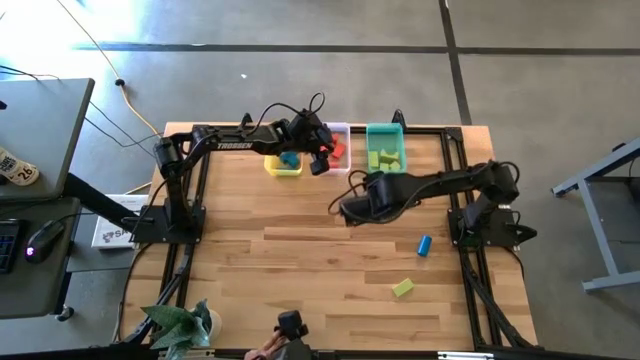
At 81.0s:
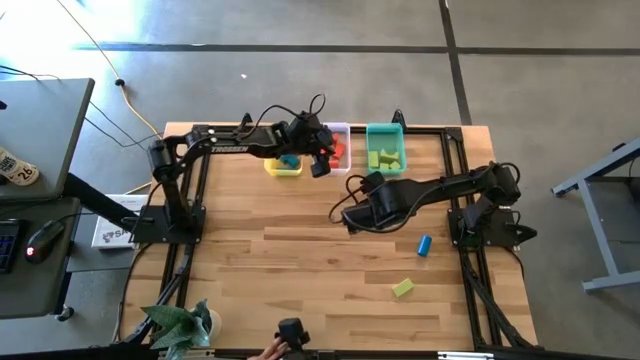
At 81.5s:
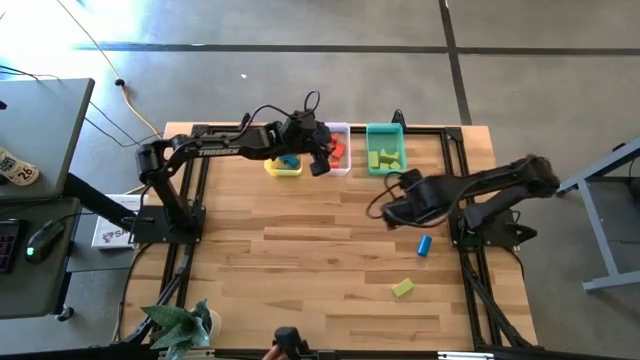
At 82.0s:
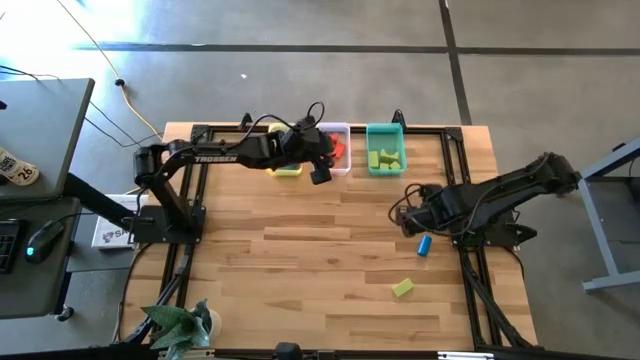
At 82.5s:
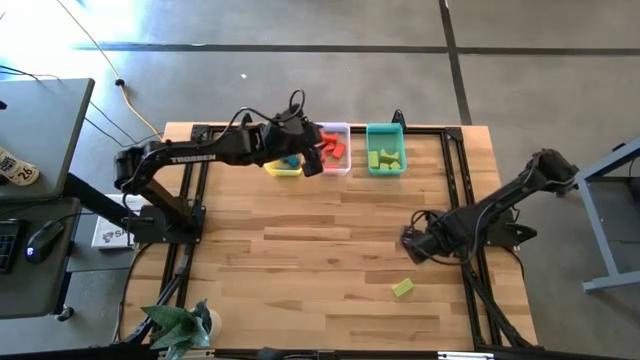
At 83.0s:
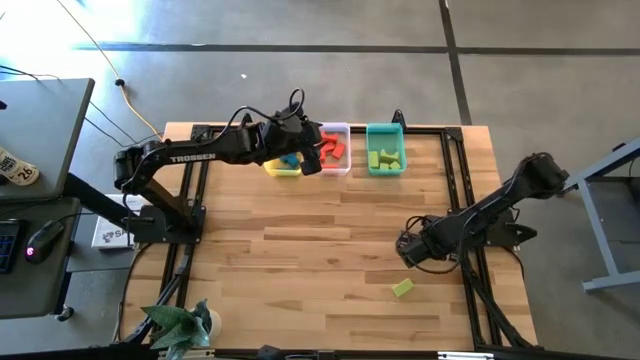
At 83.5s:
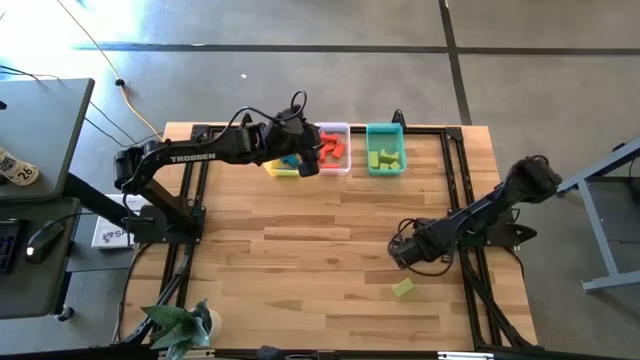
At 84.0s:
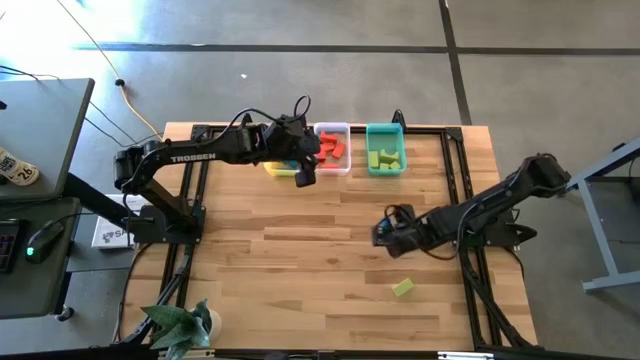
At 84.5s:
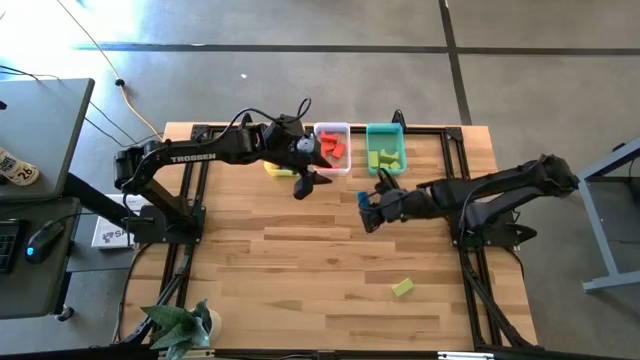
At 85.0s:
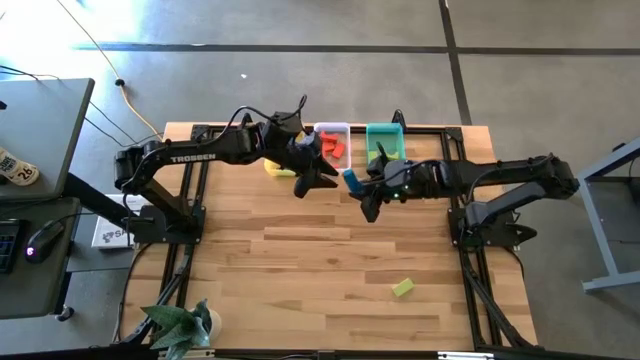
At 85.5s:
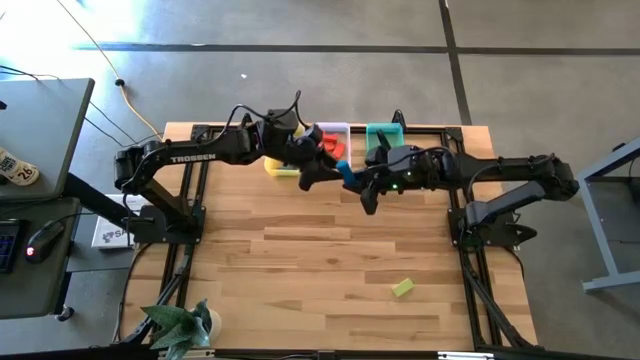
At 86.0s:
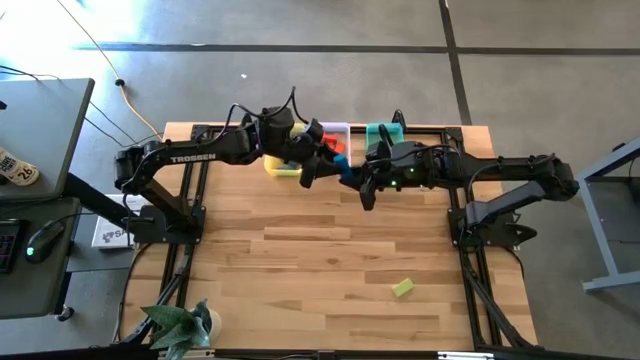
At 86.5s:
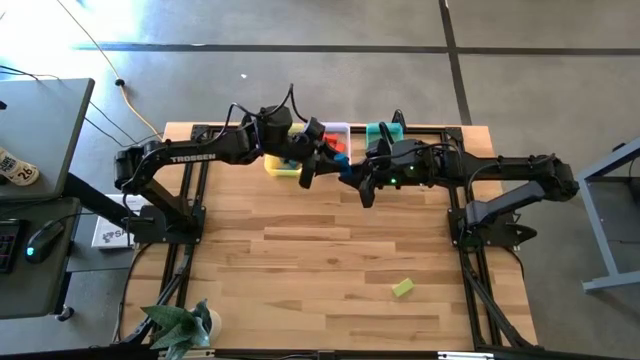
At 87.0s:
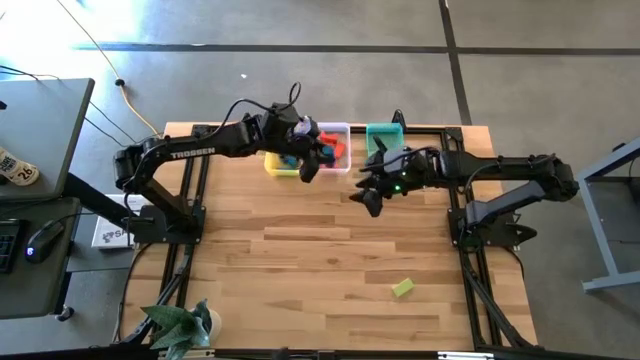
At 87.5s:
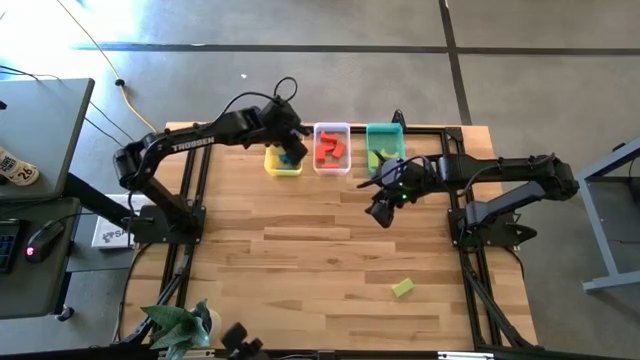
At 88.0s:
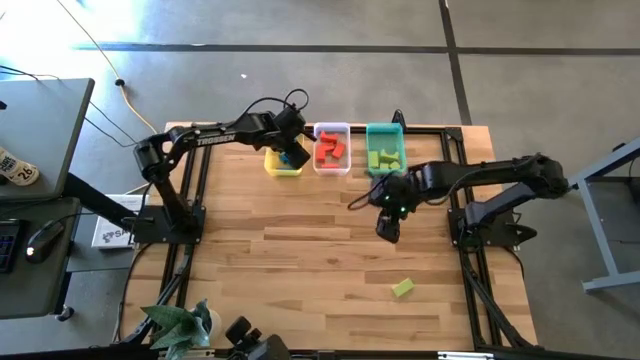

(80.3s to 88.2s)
Task: Sort & place blocks by color
Put the blue block into the yellow bin

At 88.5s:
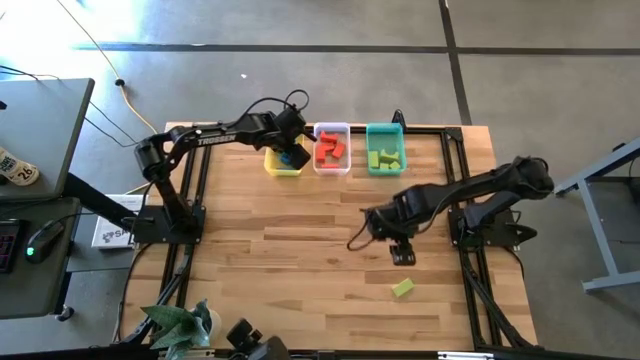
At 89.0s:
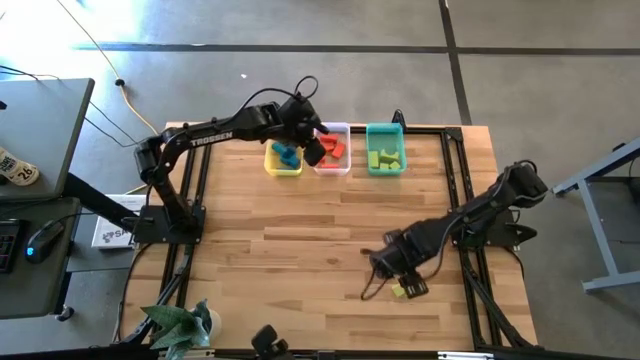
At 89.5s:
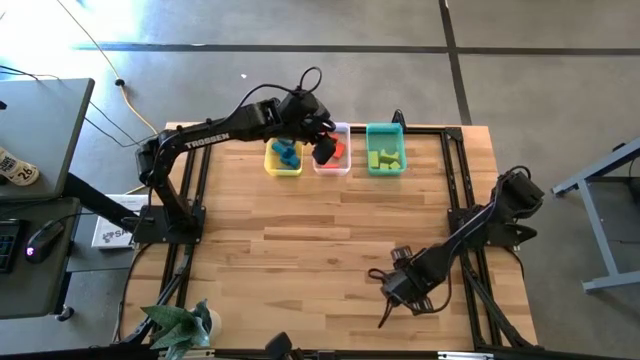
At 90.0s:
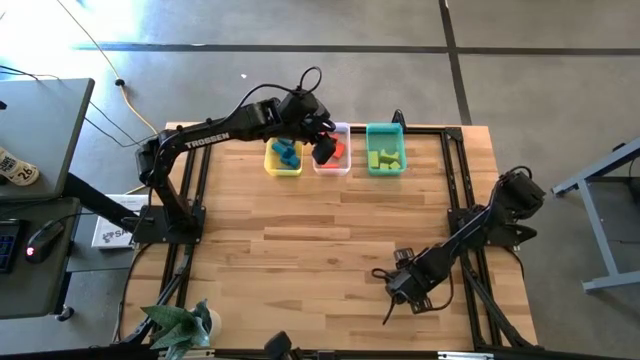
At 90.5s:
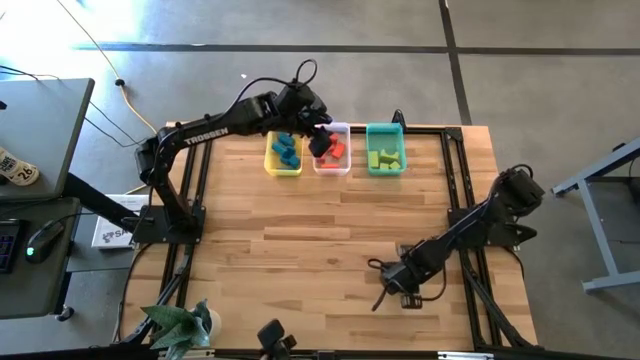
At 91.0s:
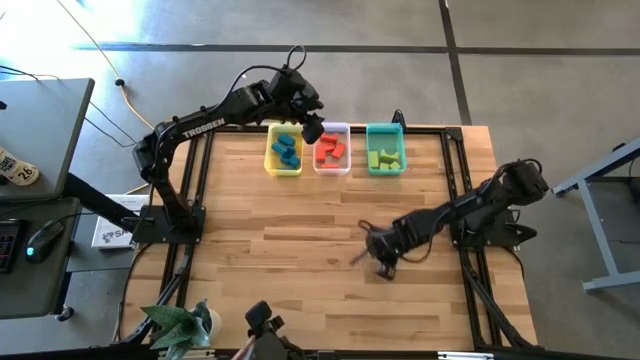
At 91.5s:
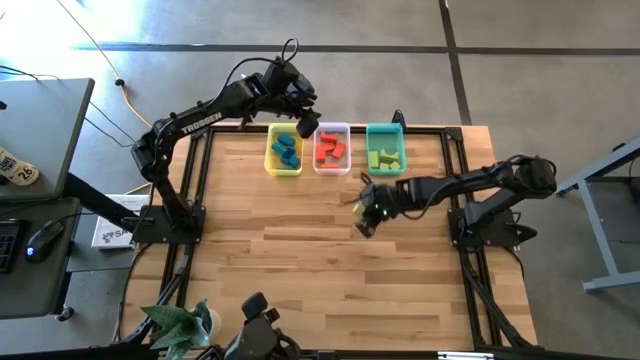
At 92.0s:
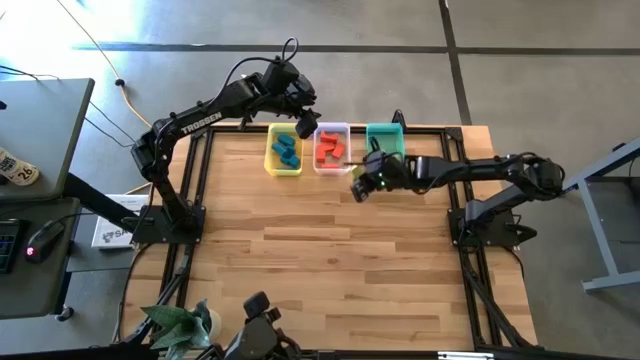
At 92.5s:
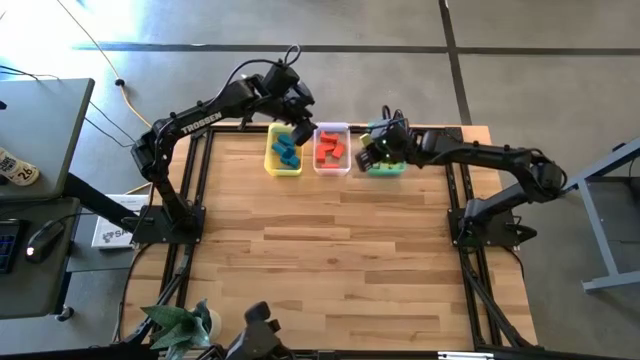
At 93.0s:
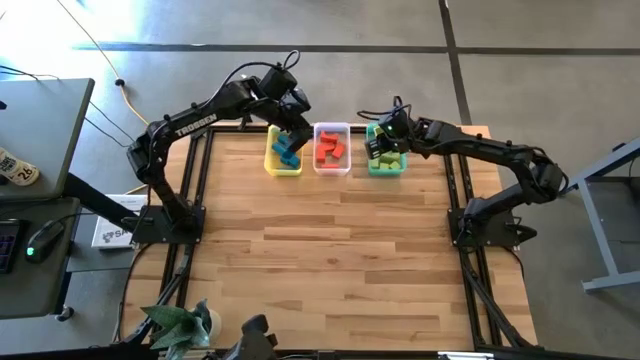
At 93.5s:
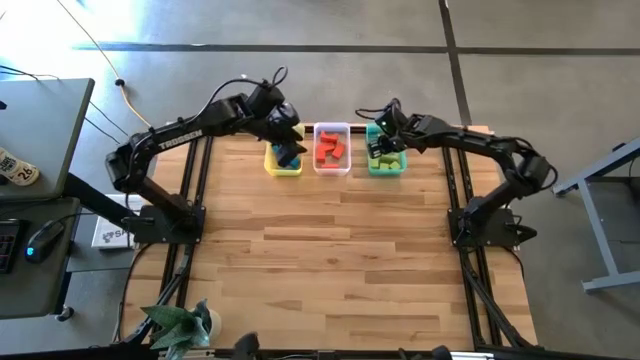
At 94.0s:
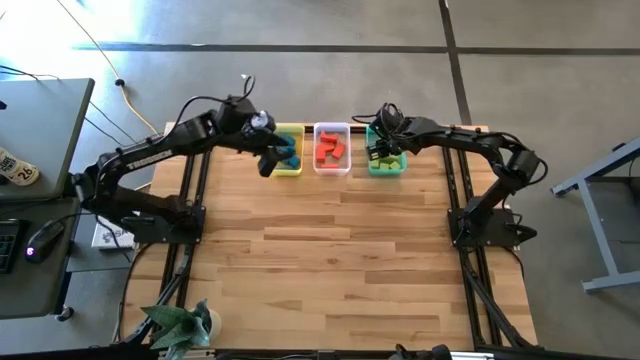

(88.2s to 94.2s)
Put the green block into the green bin

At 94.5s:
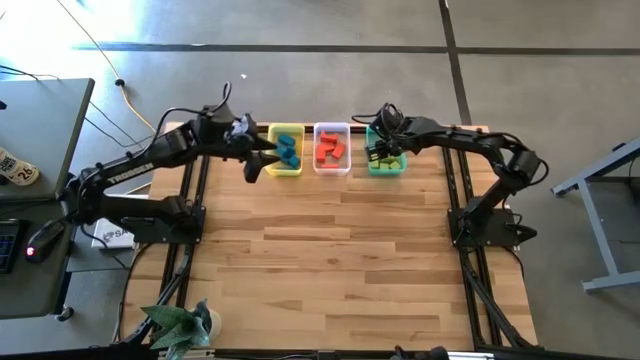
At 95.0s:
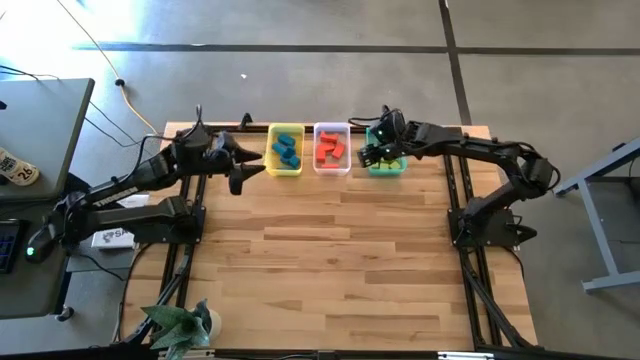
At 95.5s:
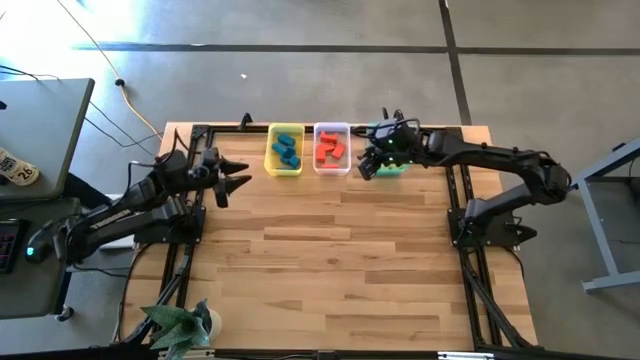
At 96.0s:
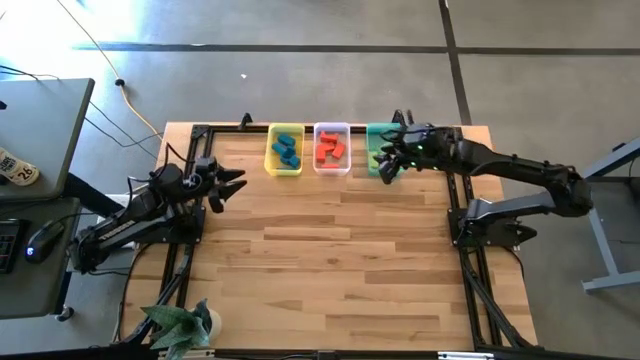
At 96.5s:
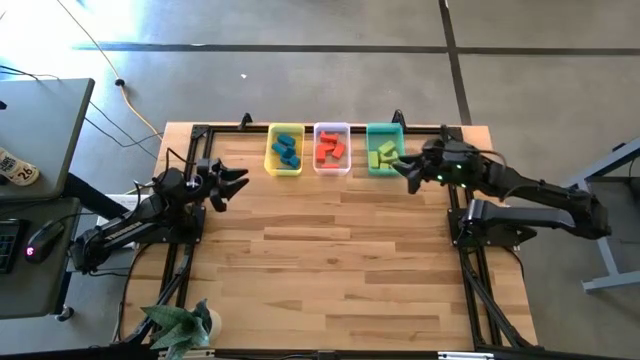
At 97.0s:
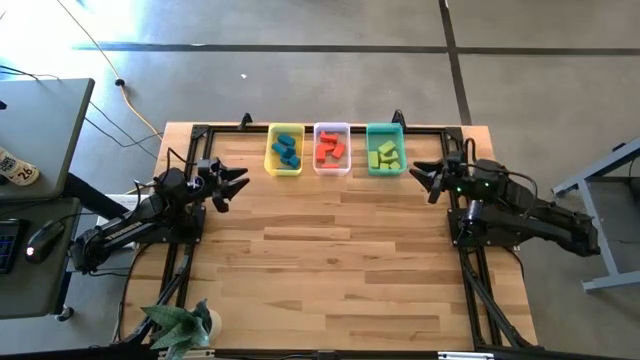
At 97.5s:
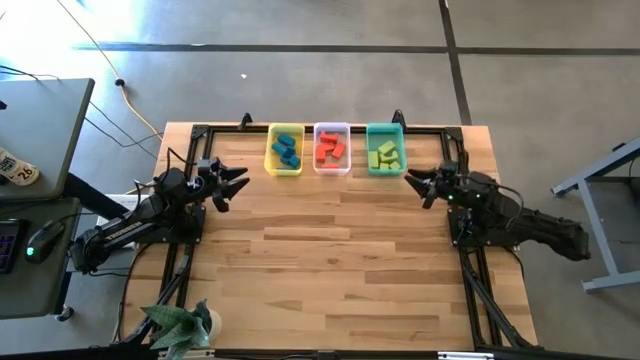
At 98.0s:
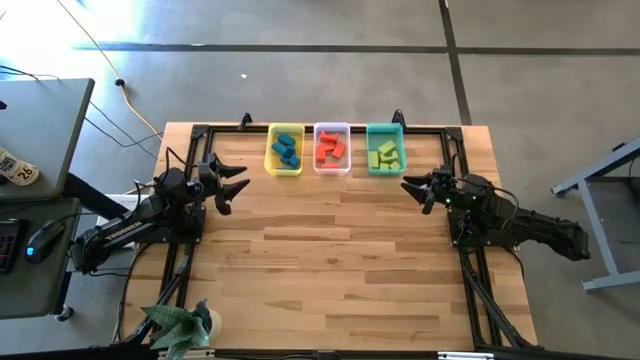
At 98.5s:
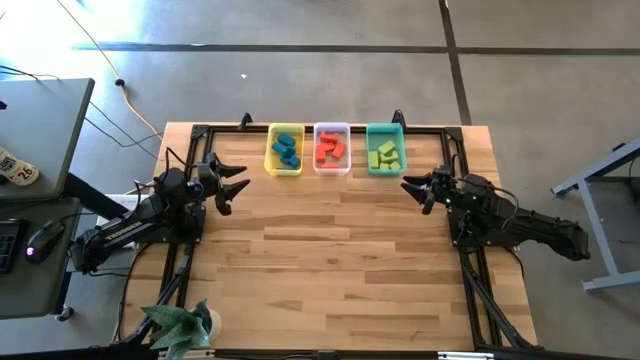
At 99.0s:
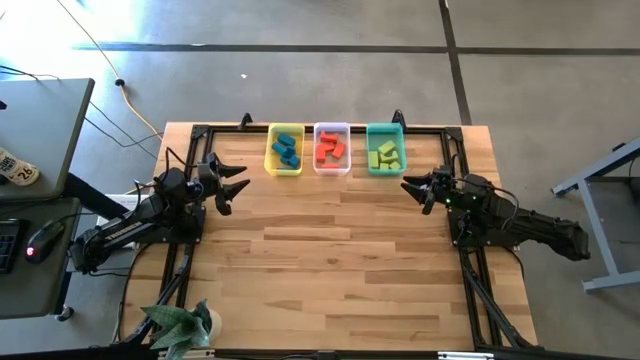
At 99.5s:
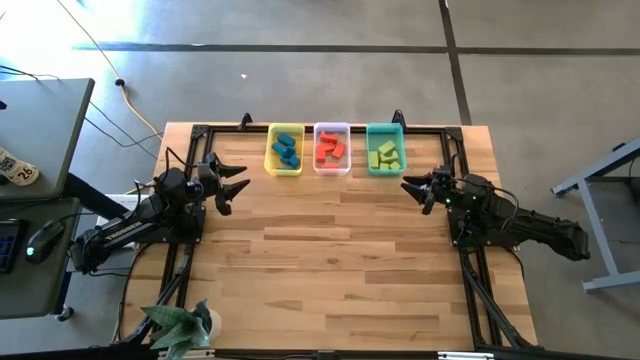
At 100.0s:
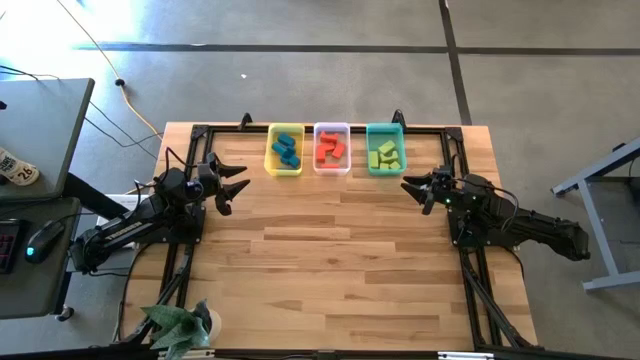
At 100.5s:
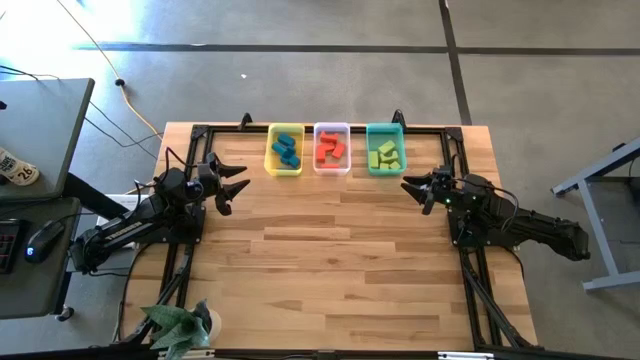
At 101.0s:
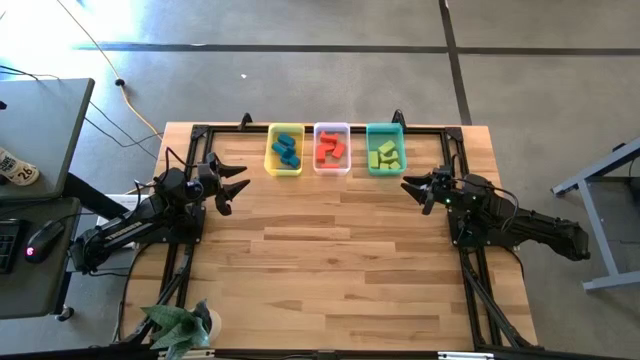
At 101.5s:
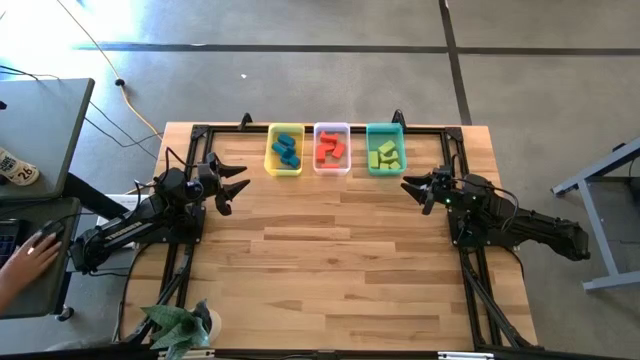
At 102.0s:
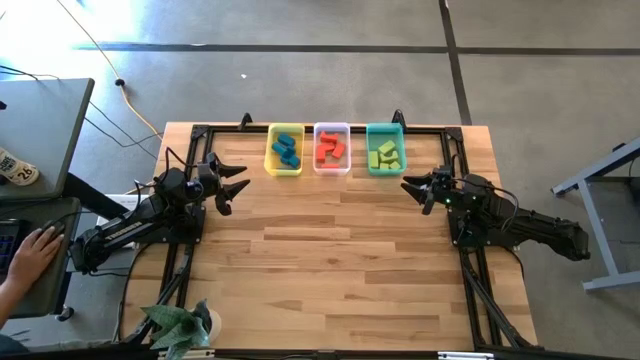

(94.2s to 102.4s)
Return to Home Position

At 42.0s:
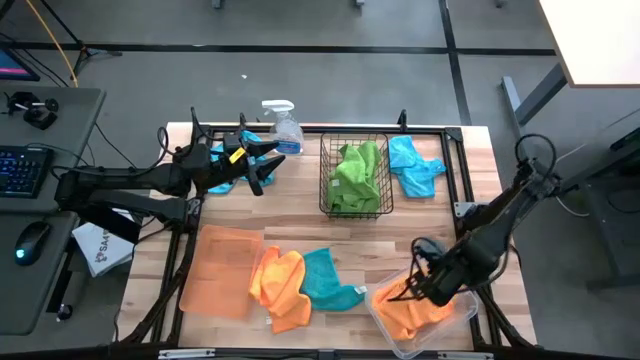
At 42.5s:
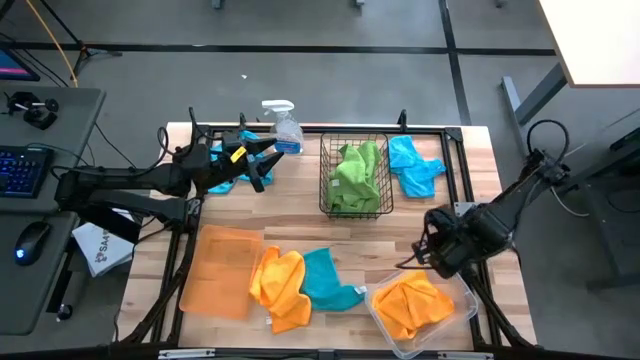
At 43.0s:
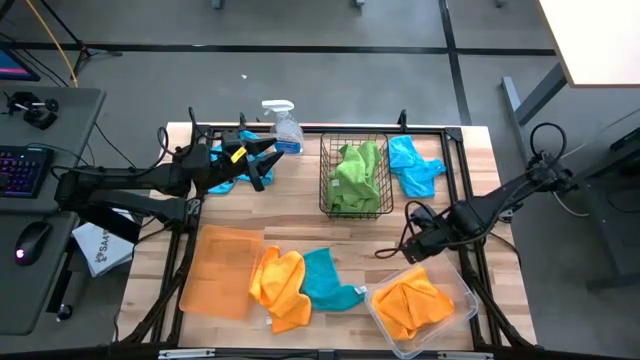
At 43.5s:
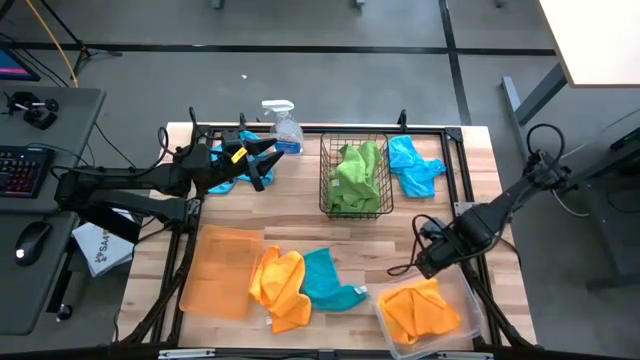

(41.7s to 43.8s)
Task: Sort microfiber towel by color & place in baskets
Adjust the transparent bin
